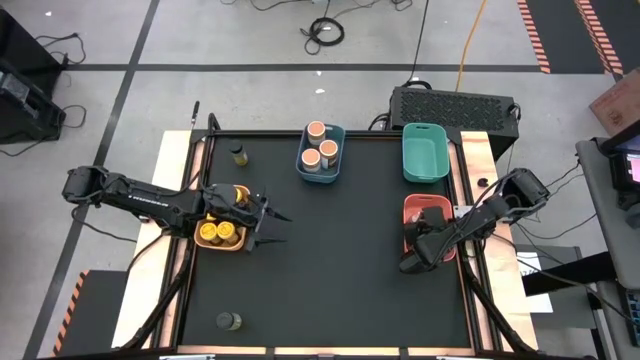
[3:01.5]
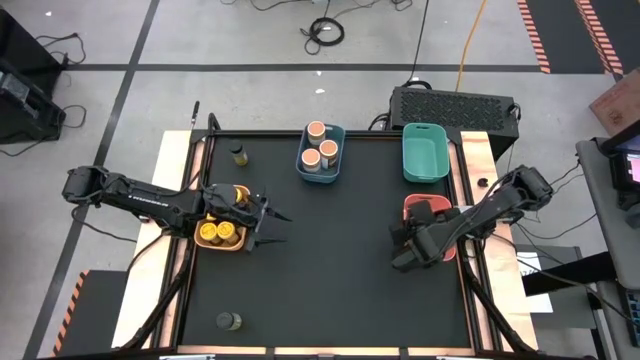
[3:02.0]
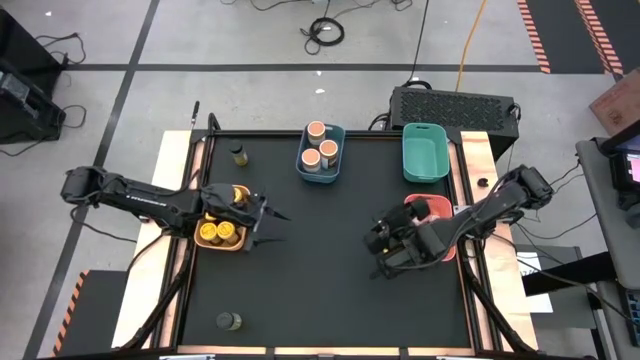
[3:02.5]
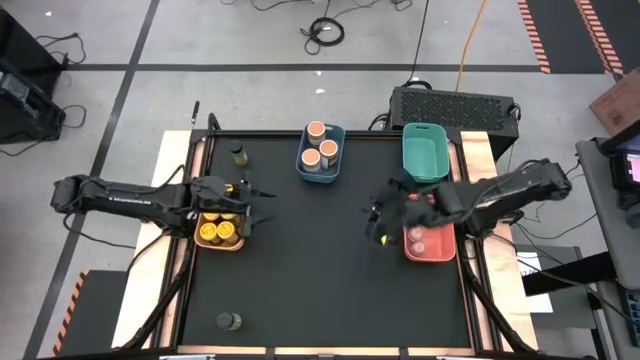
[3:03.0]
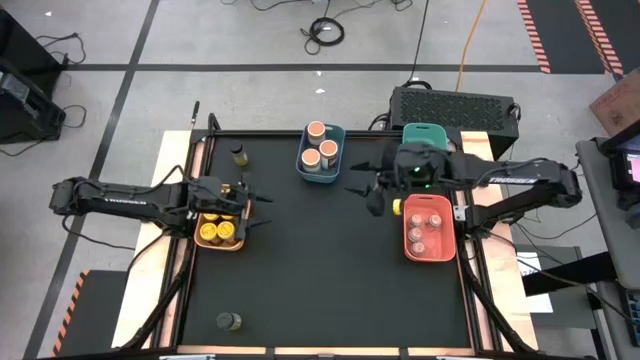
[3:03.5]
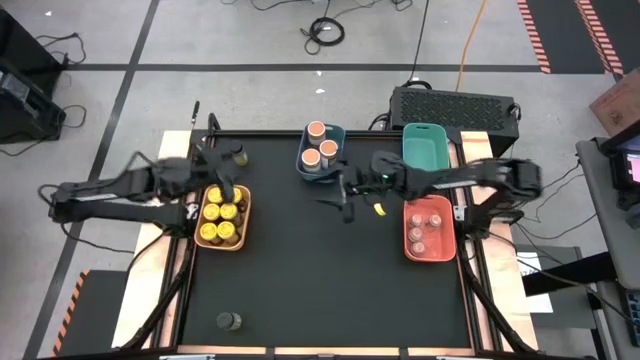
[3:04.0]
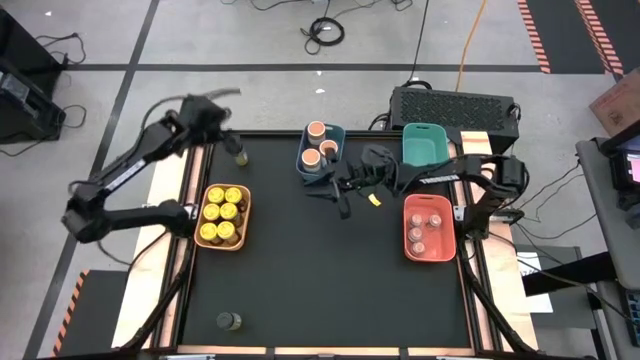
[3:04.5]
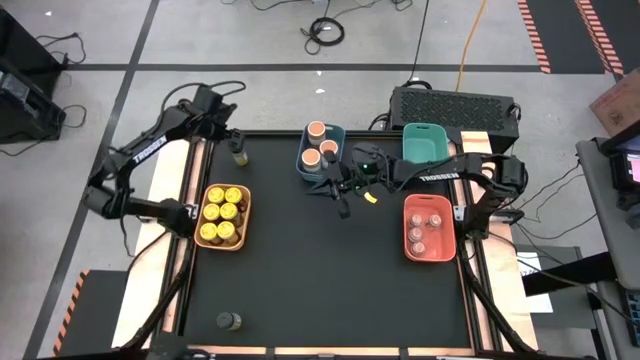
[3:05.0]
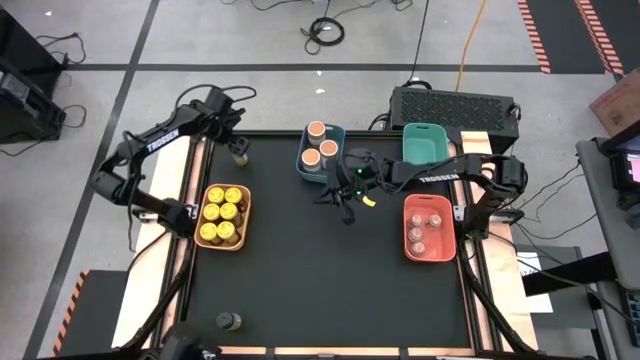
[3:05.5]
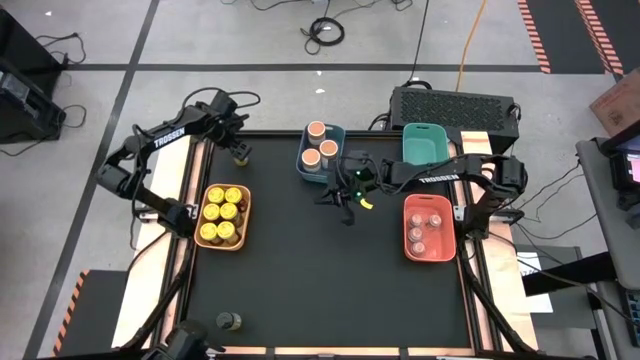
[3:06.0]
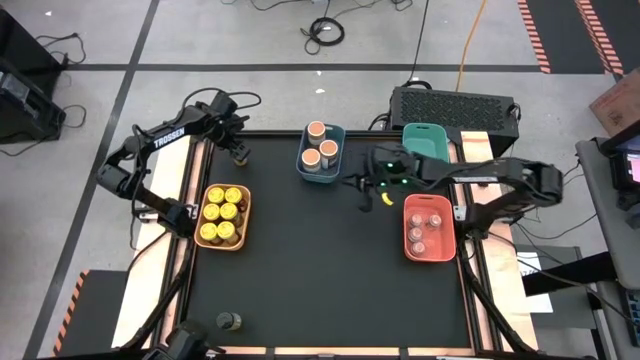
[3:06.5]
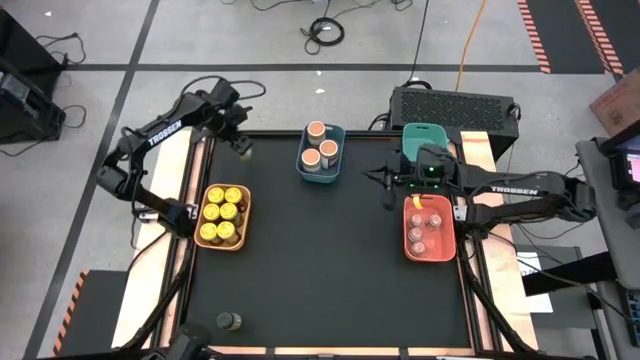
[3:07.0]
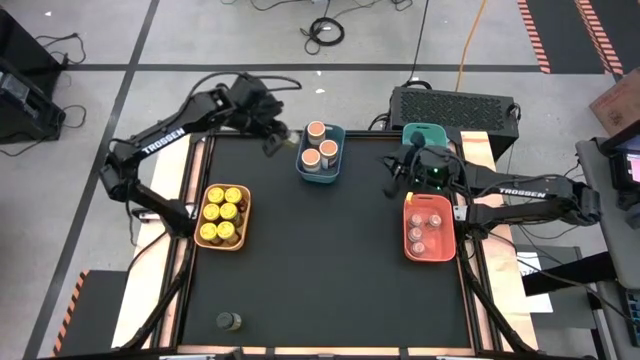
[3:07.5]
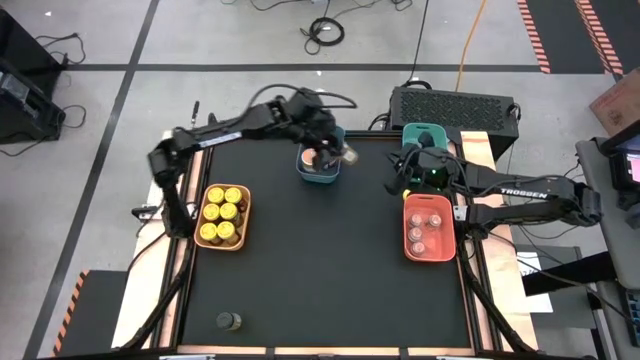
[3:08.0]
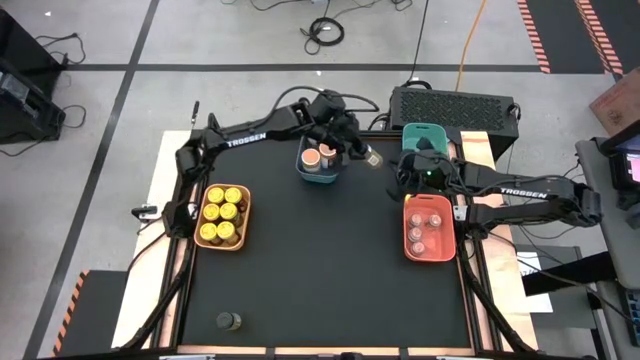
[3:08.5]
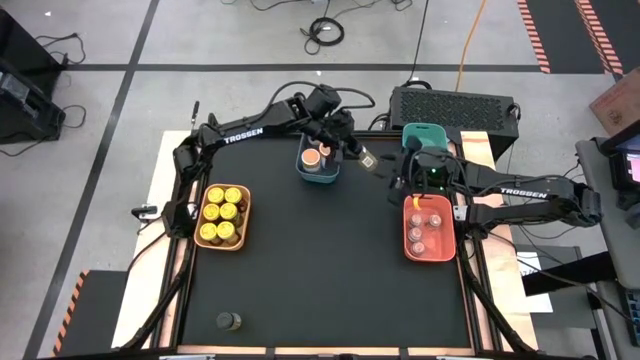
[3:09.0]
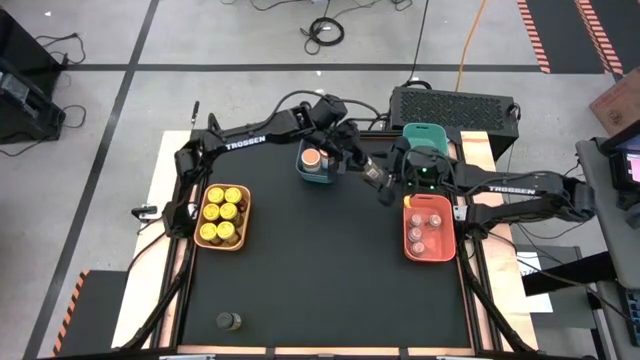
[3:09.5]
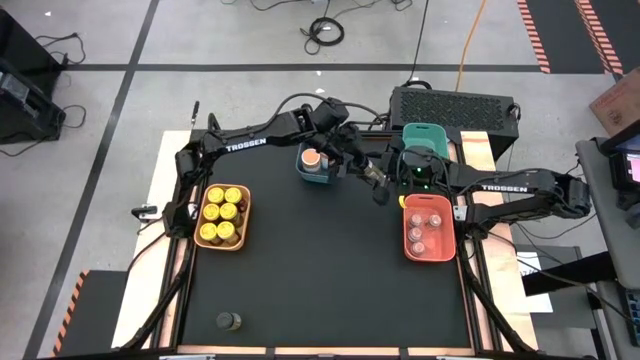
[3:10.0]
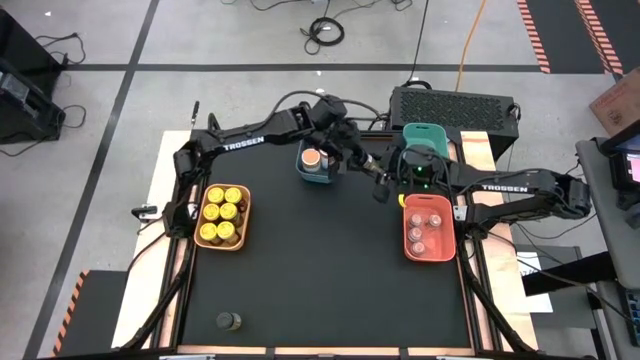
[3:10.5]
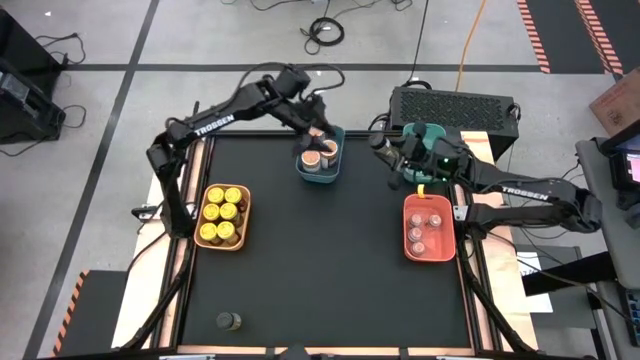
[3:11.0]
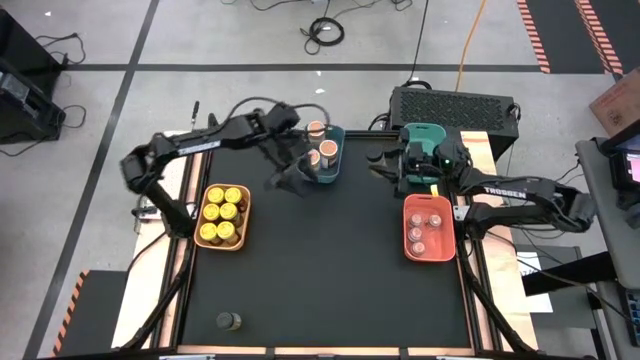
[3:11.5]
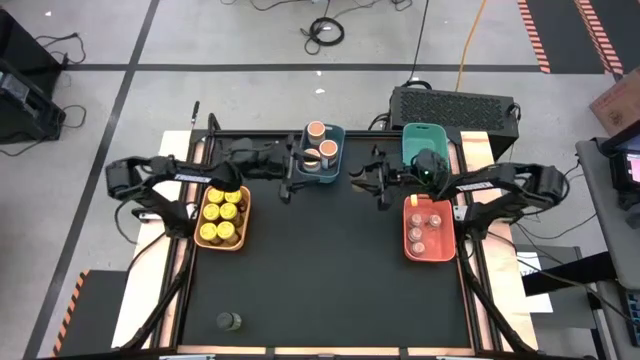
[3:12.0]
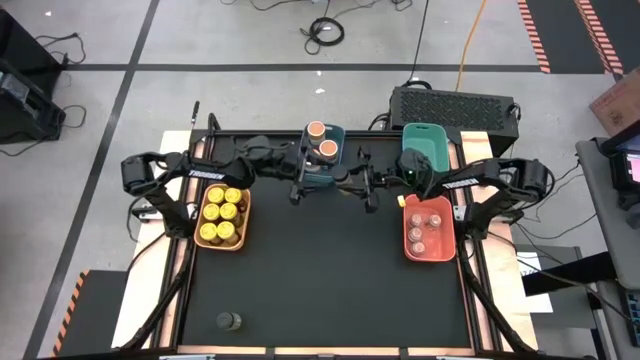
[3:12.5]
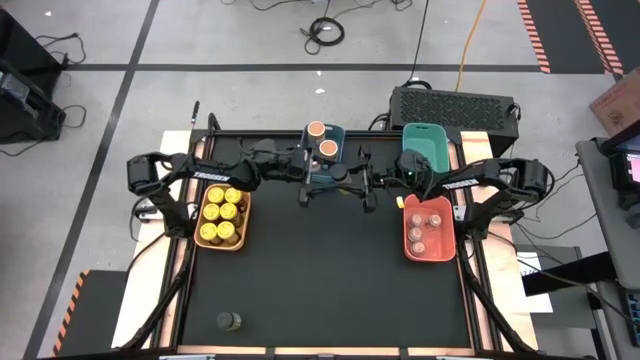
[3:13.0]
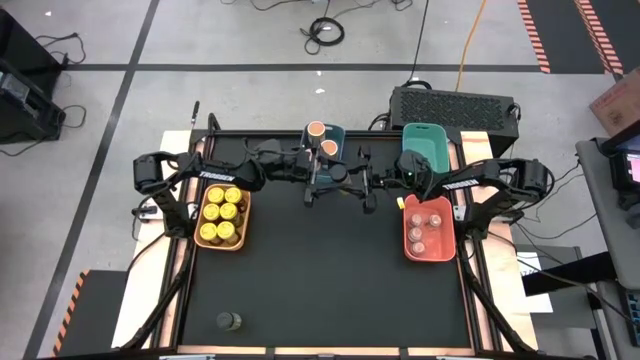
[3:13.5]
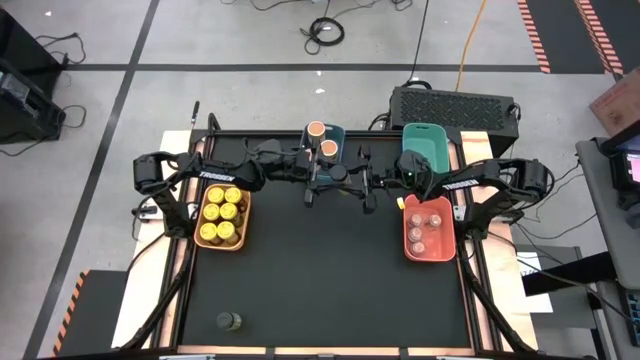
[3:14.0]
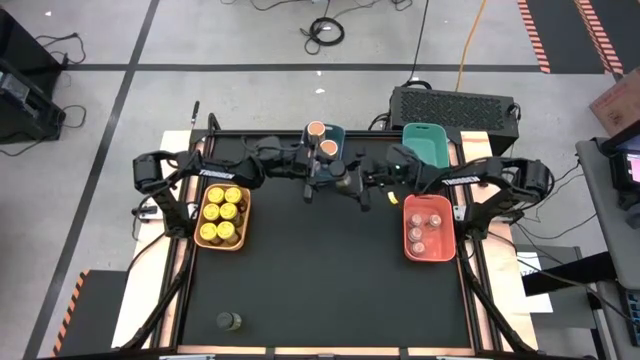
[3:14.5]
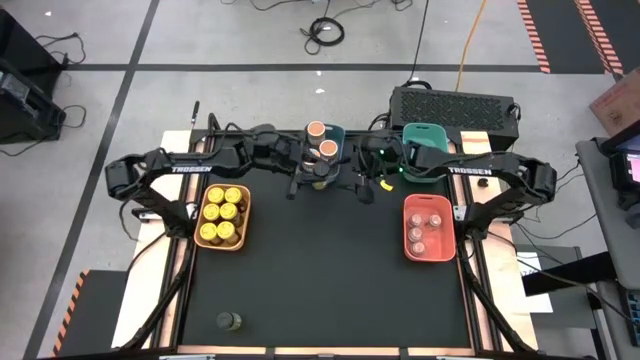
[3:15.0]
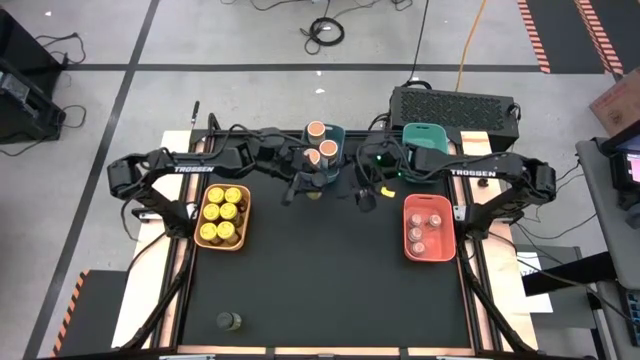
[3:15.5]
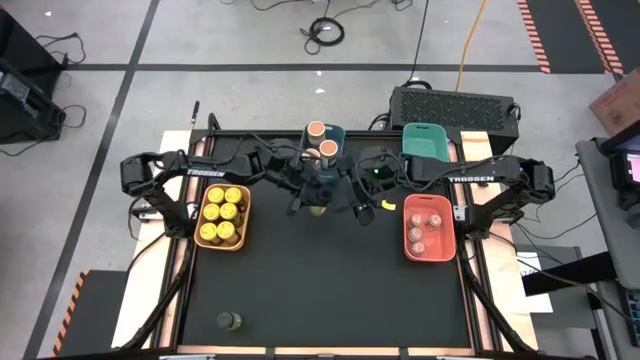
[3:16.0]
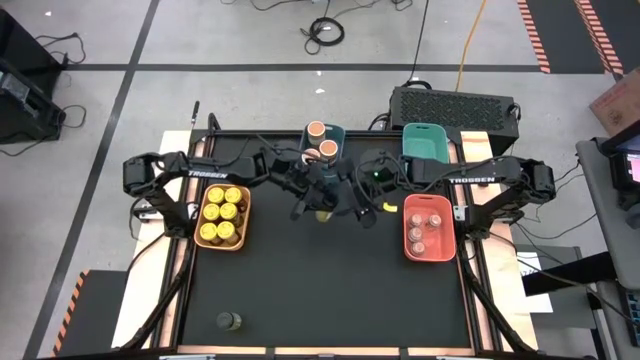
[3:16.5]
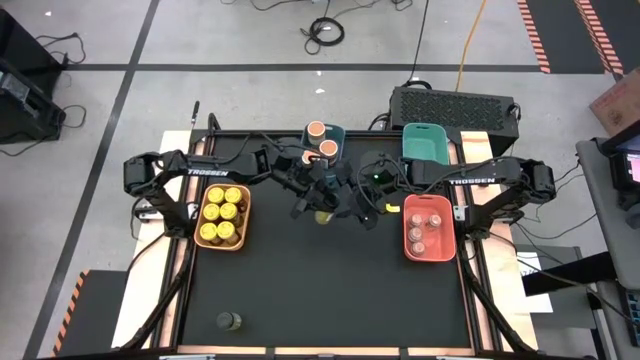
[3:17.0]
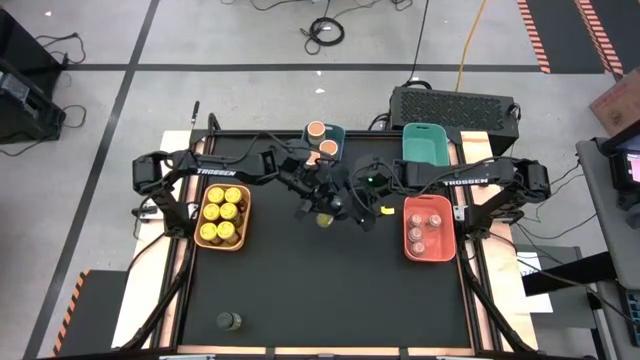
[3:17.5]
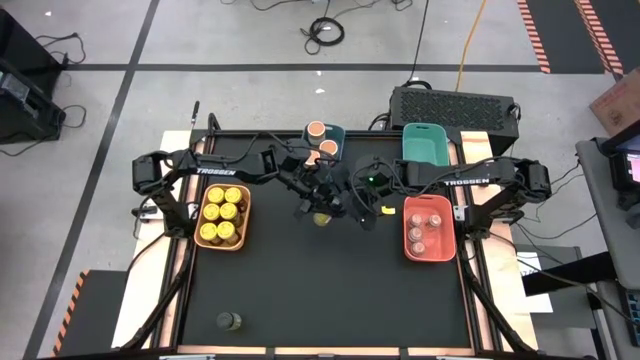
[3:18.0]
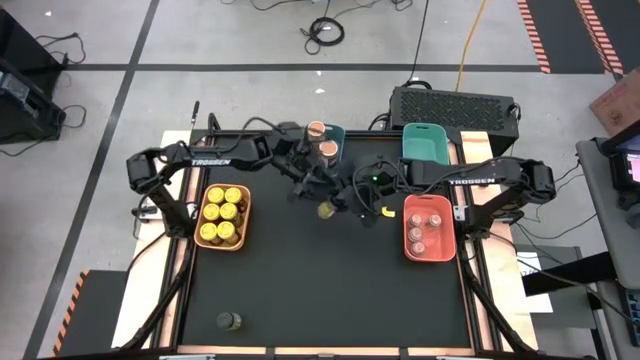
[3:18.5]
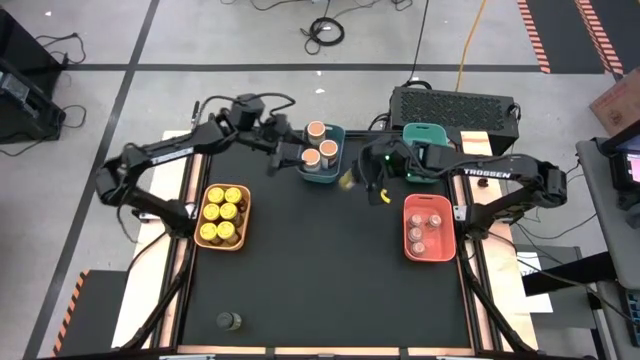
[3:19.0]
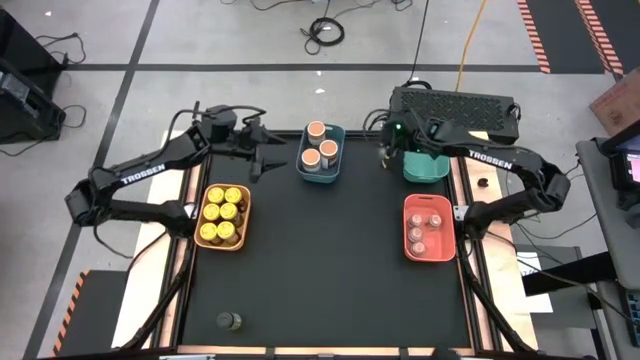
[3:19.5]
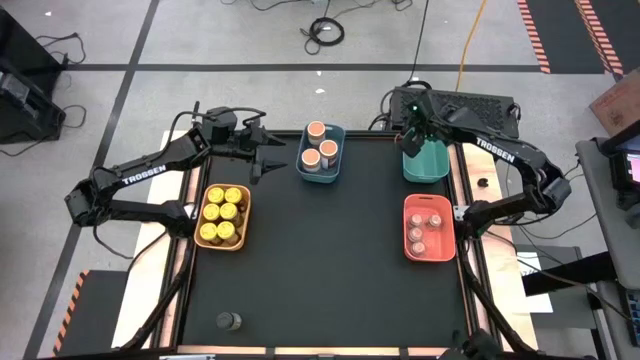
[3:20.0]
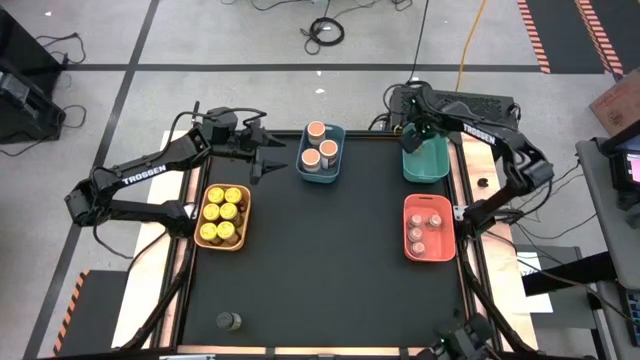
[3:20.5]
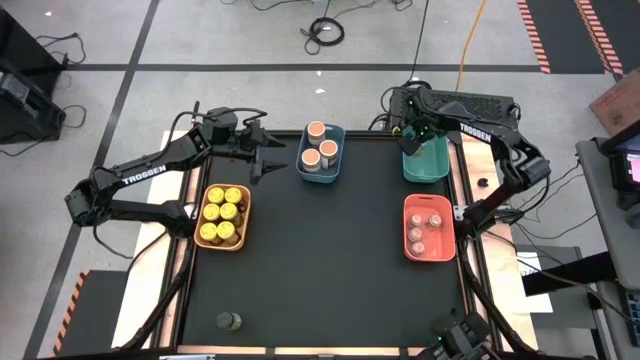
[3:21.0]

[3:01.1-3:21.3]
Task: Sort spices by type
Put the black seasoning bottle into the light green bin

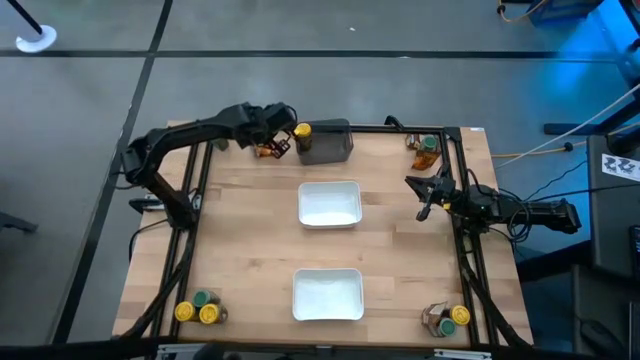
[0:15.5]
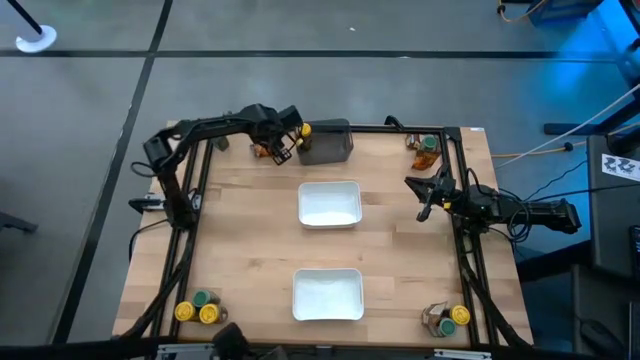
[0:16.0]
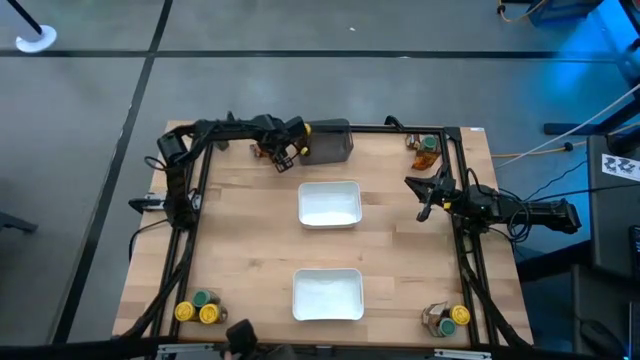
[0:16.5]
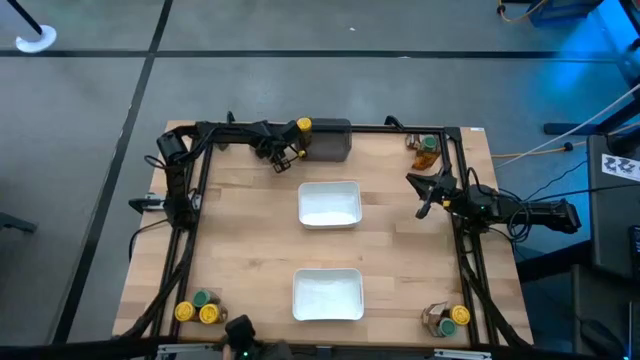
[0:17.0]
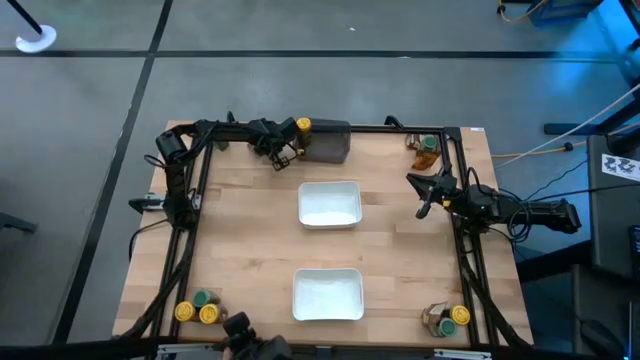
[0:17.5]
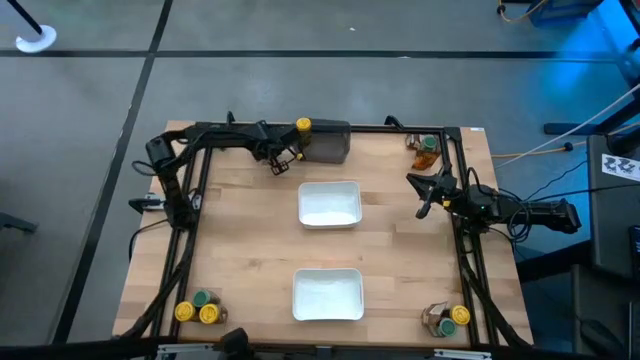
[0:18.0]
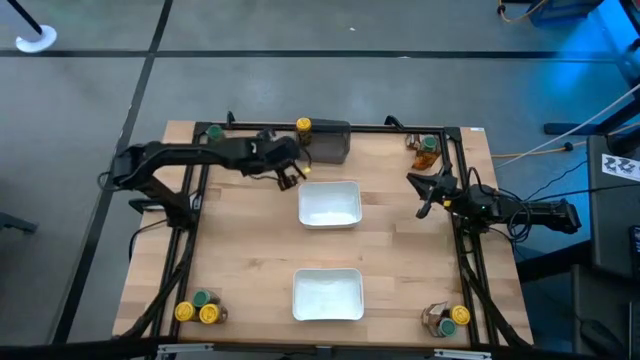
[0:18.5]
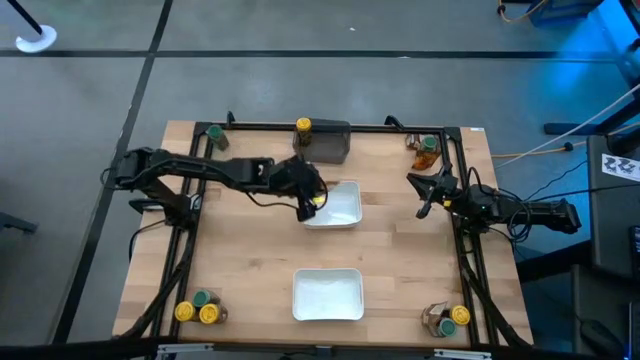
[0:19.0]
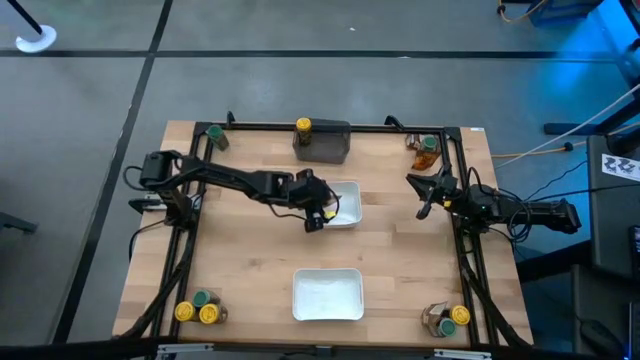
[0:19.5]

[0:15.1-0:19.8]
Task: Sort spices by type
Put the orange seasoning bag into the white bin
